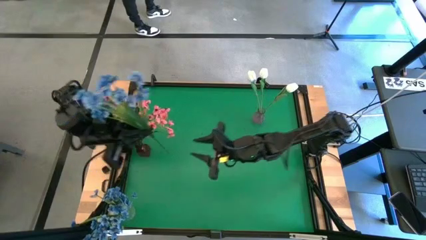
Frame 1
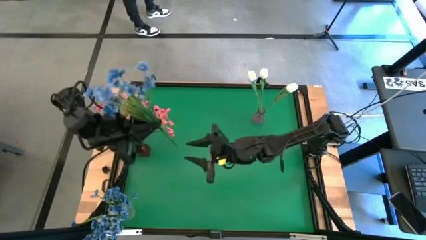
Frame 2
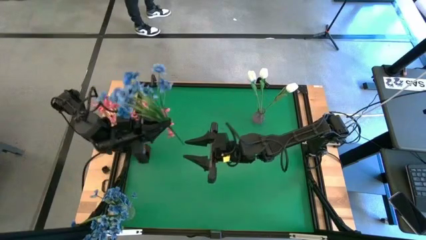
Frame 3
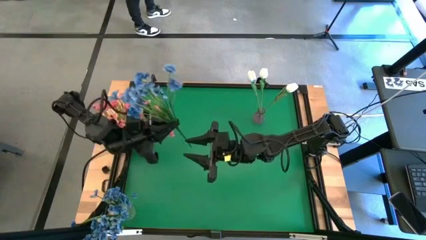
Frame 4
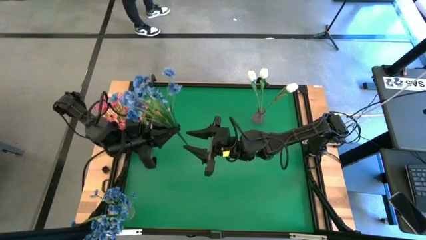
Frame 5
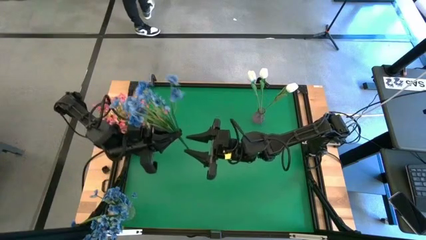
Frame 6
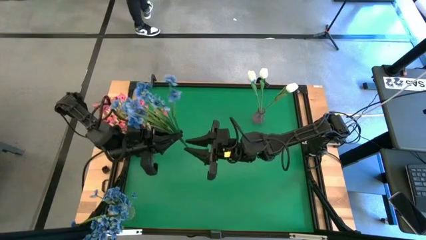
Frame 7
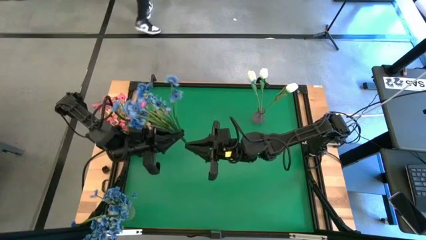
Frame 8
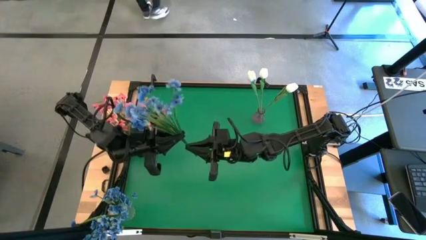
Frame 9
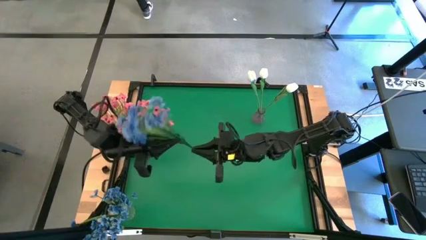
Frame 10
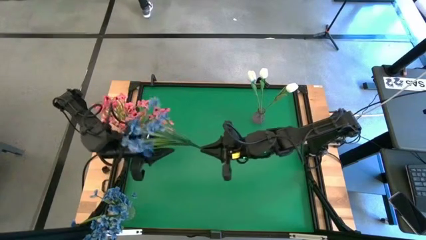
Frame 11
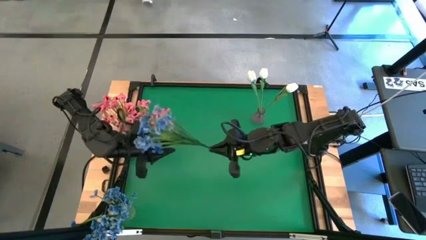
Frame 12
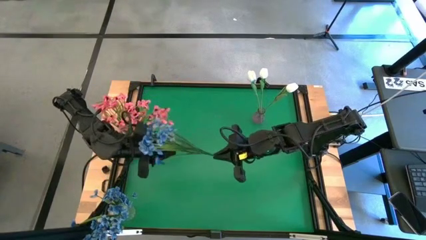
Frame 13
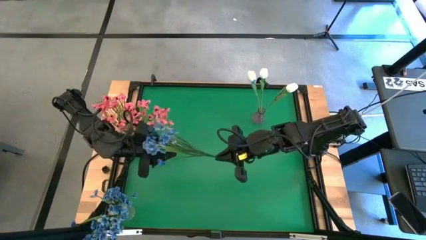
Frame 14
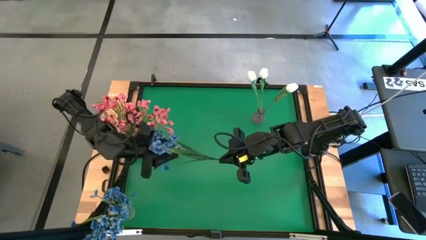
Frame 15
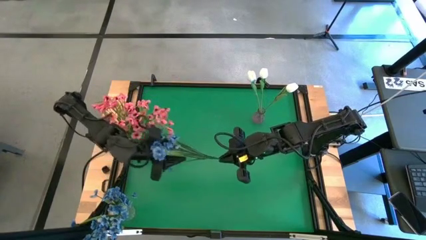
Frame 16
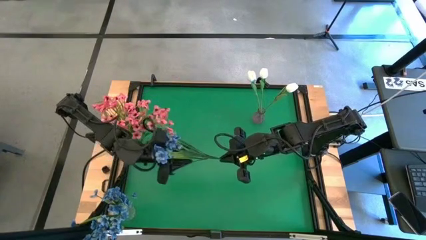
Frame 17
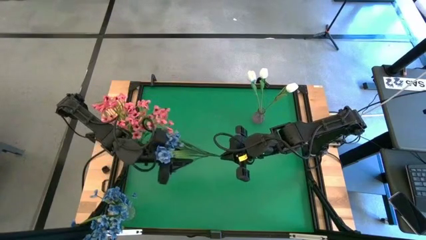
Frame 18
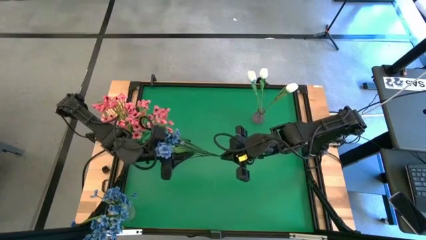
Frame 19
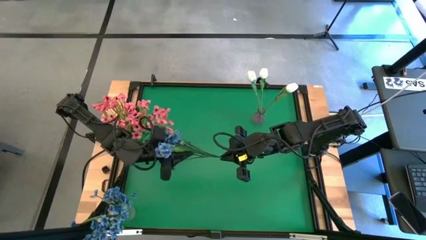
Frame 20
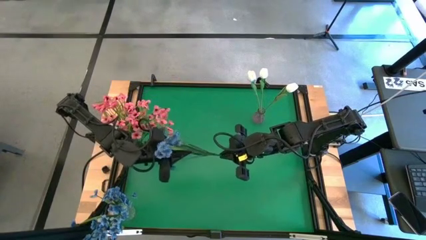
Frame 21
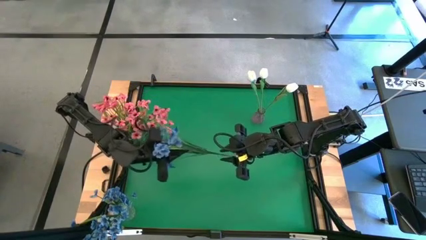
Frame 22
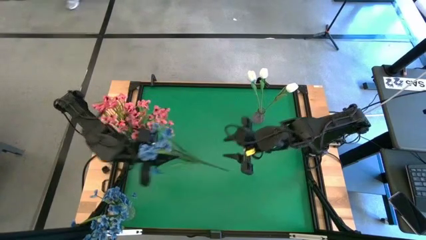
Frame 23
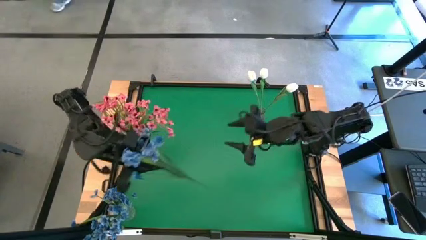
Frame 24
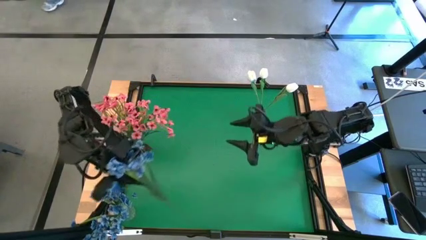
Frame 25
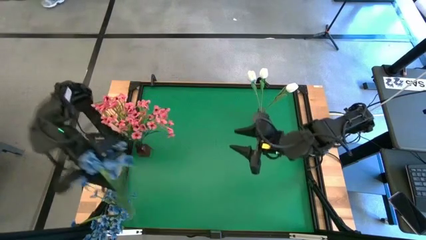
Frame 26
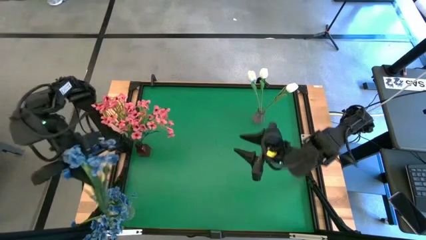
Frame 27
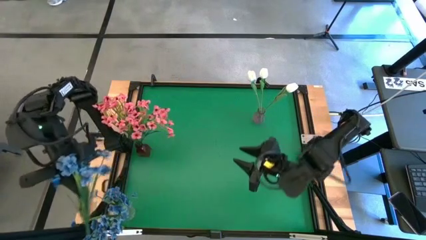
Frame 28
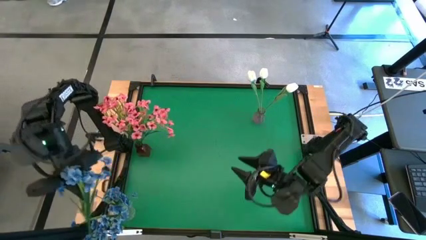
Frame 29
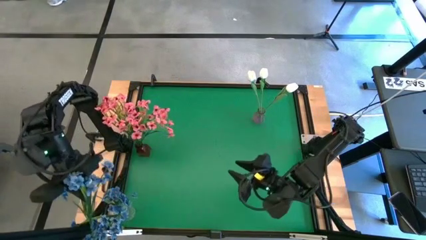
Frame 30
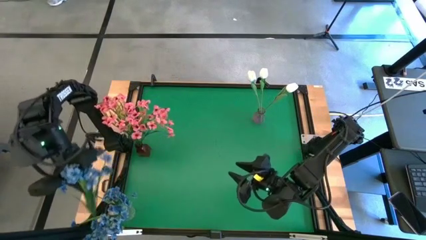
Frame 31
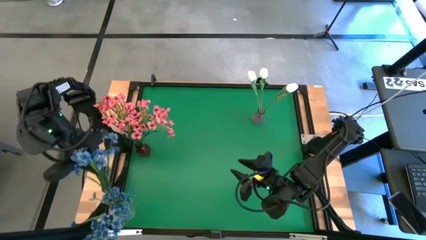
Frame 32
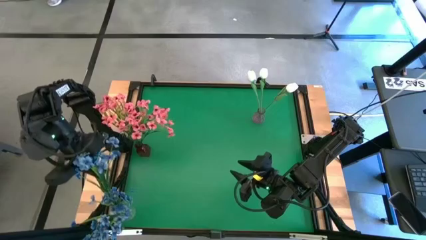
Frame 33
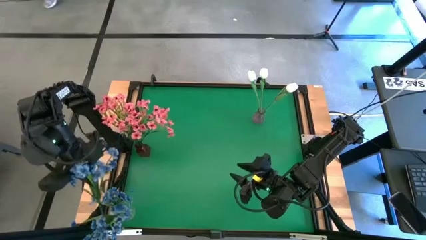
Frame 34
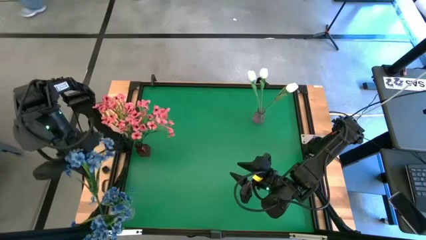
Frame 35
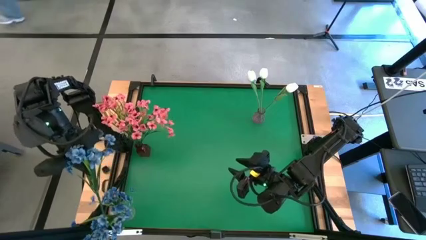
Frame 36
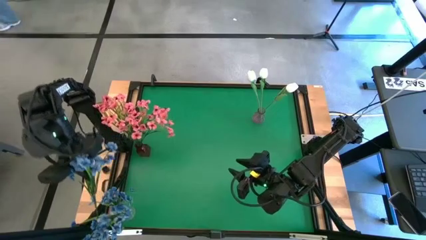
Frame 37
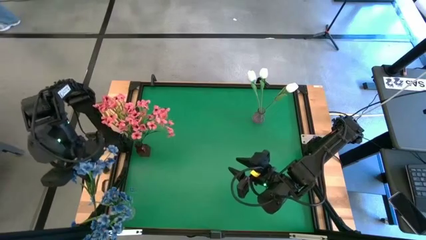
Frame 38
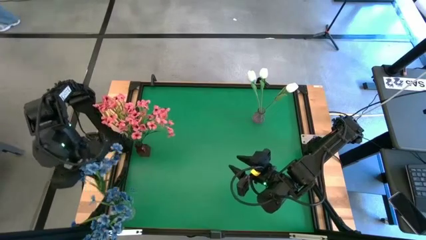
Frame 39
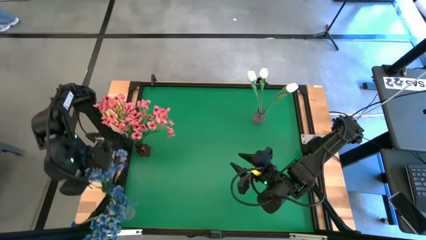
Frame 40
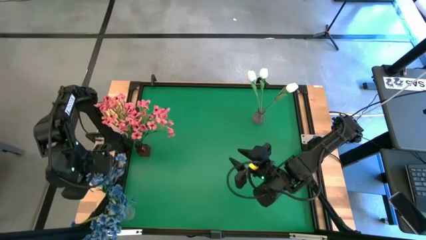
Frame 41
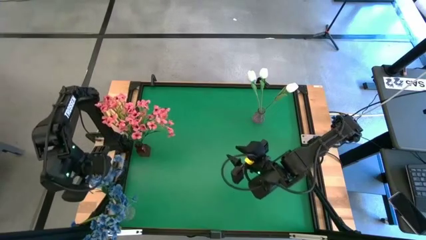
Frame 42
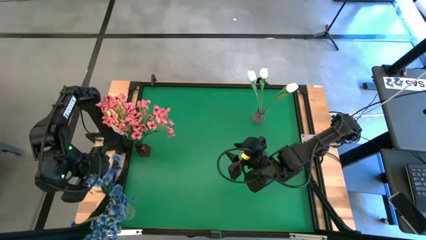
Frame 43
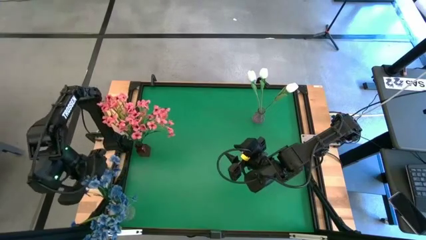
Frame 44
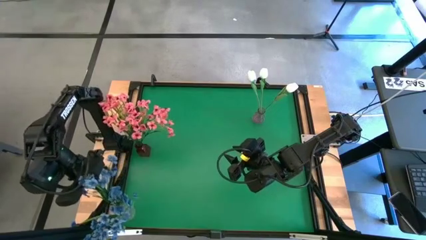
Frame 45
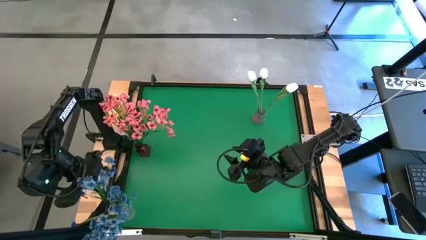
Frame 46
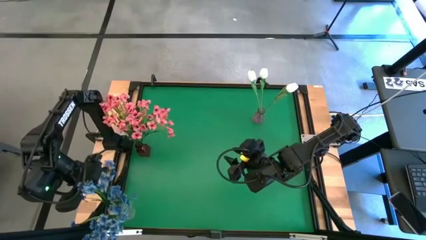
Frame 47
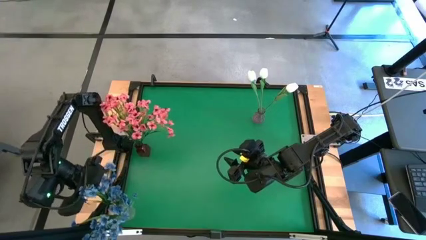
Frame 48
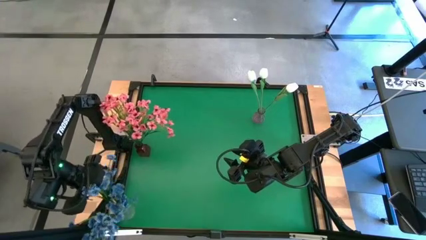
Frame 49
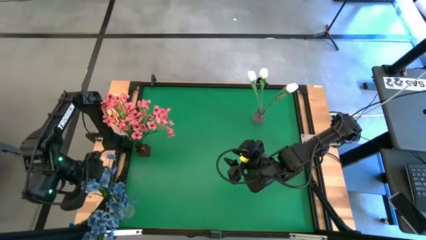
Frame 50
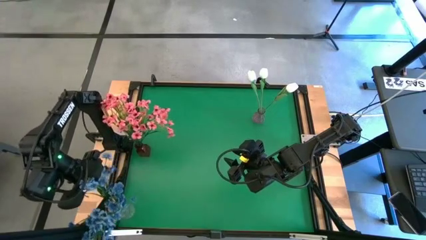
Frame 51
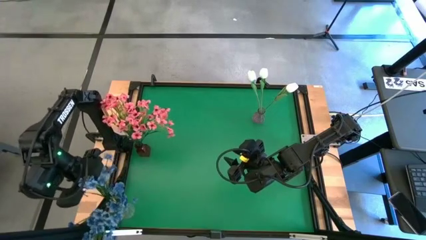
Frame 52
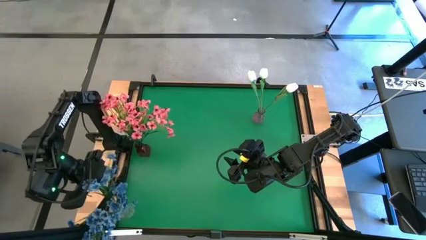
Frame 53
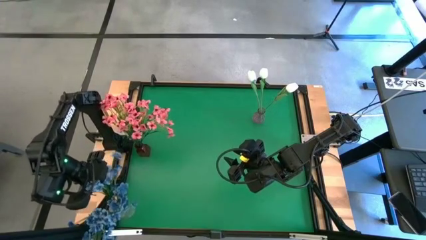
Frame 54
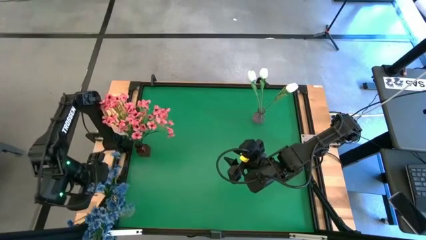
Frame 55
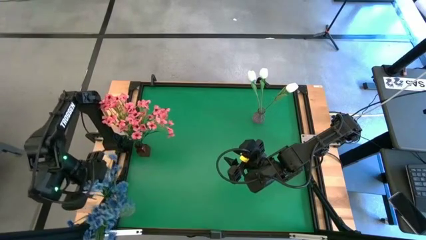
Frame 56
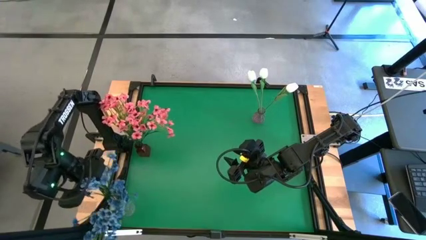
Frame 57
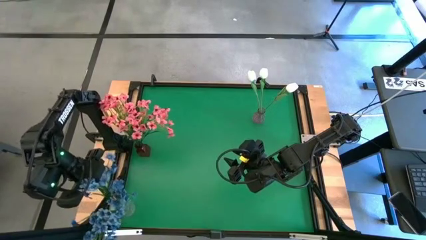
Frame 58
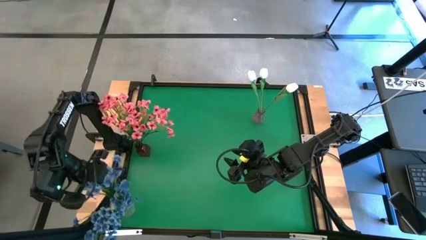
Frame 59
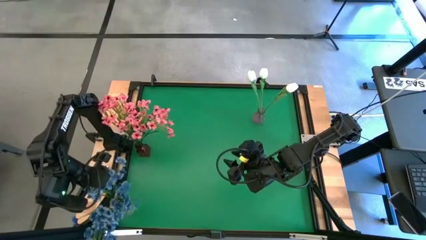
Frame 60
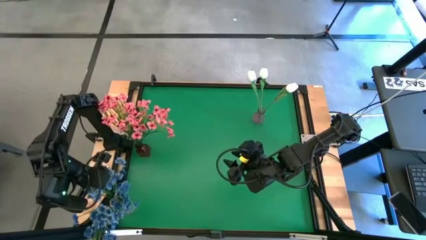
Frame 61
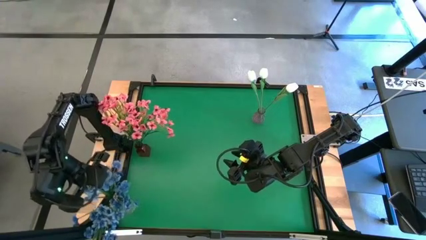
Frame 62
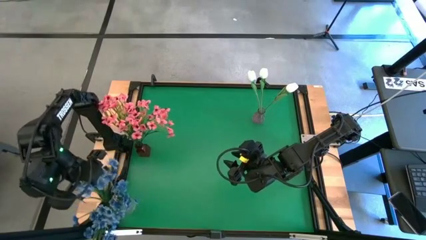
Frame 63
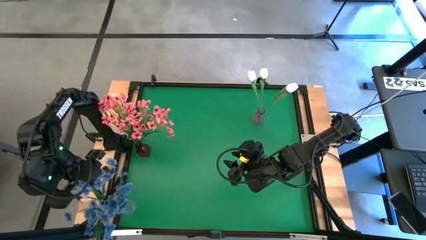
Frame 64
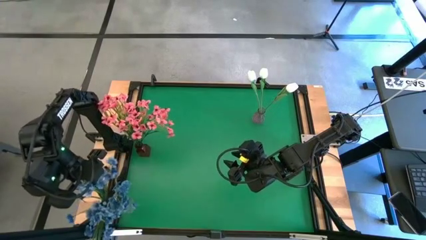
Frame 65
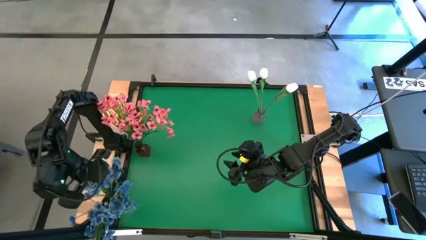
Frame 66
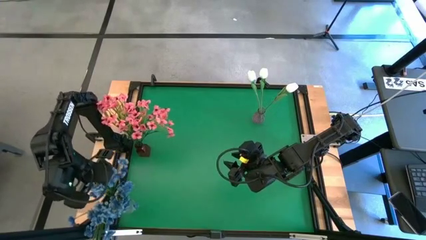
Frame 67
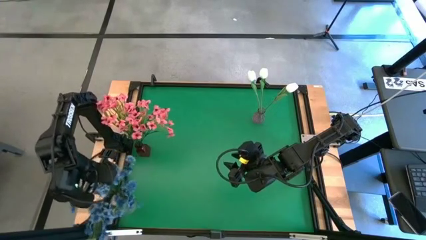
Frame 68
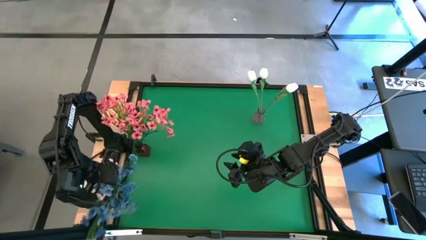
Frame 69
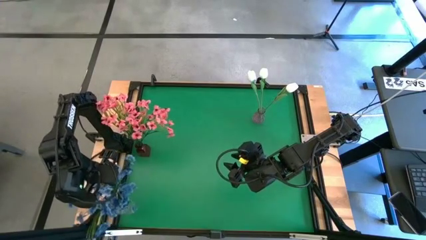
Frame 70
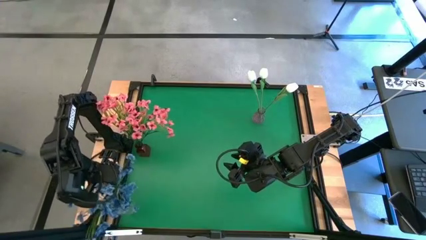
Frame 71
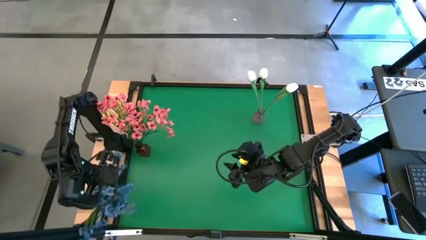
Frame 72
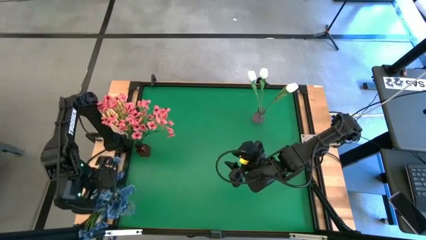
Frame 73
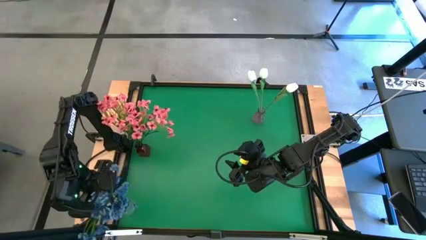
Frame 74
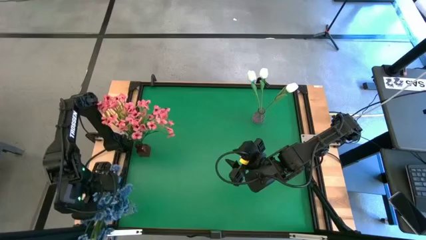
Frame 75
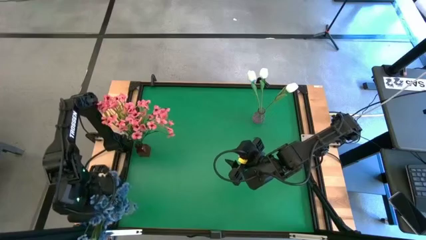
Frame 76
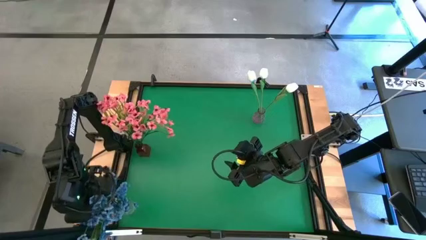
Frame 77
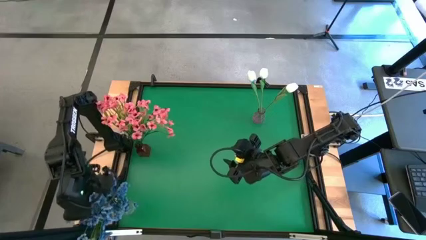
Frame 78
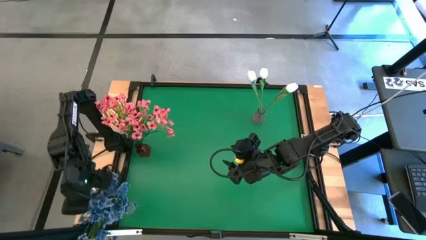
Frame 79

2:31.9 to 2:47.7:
Task: Sort flowers into vase by color
Put the blue flower into the transparent vase

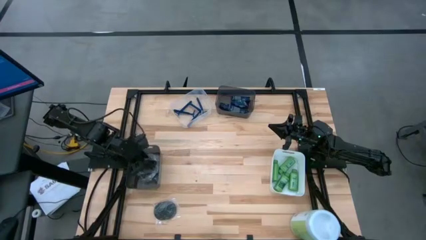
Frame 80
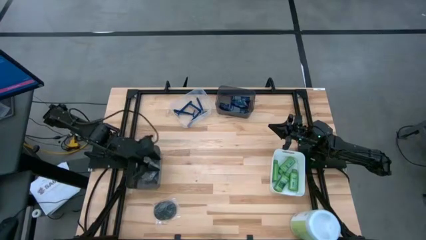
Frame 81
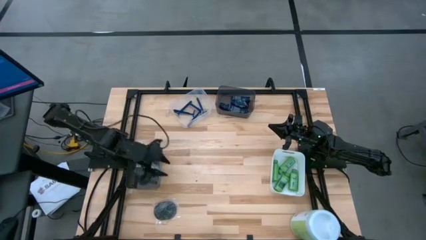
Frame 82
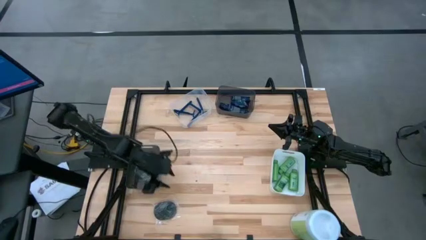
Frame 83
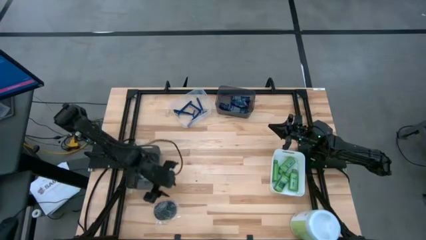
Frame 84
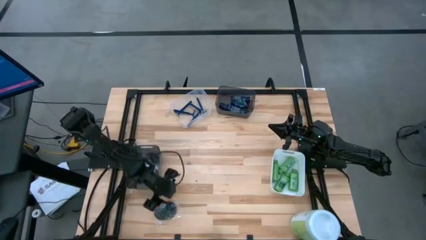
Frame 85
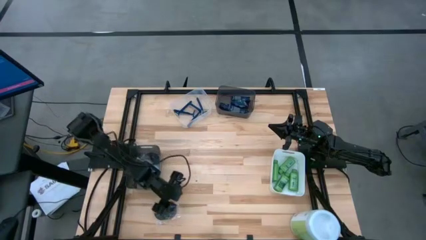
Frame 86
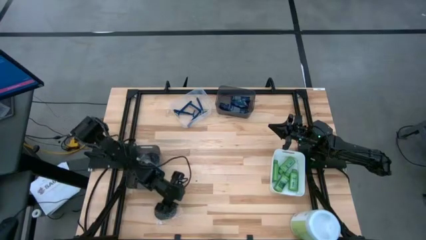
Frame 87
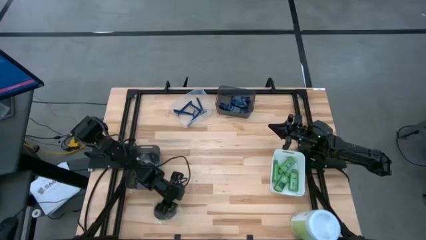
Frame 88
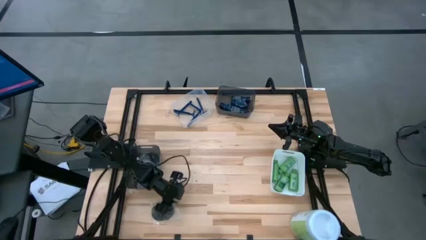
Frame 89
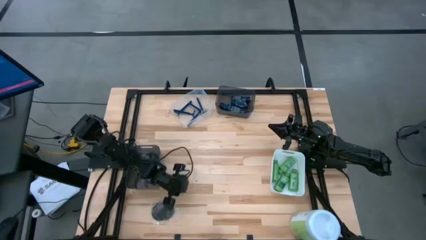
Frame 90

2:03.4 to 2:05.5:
Task: Pick & Place Travel size toiletries
Put the black hairbrush into the bottom black bin
